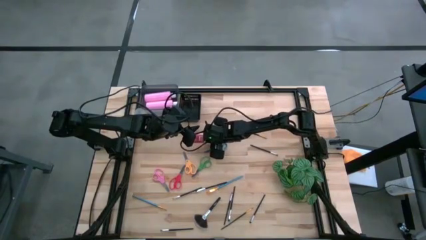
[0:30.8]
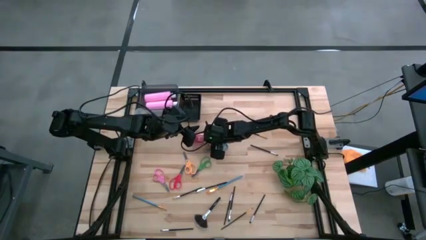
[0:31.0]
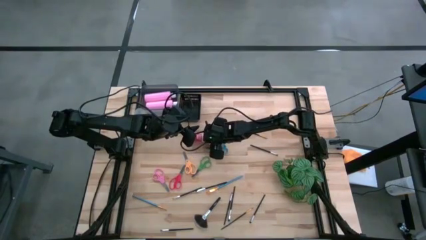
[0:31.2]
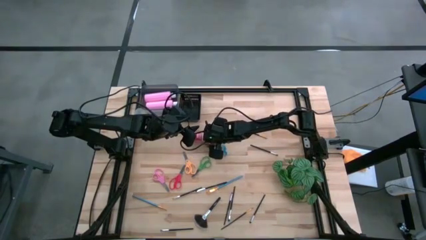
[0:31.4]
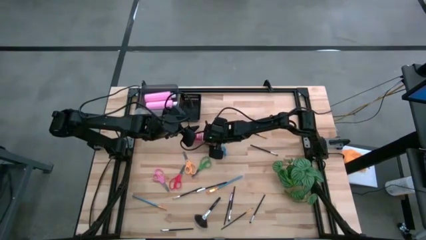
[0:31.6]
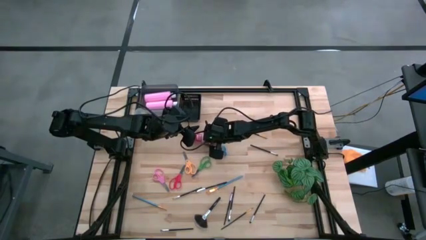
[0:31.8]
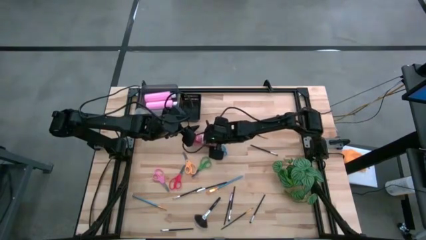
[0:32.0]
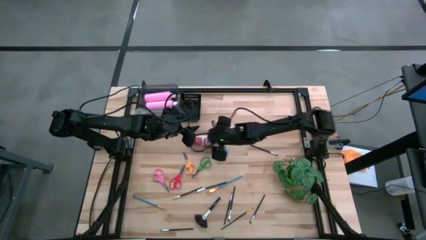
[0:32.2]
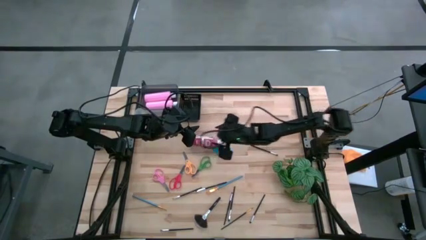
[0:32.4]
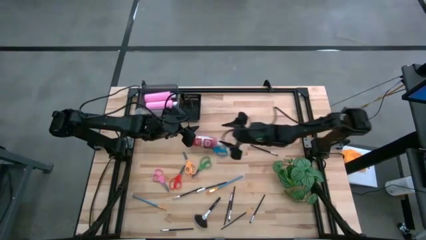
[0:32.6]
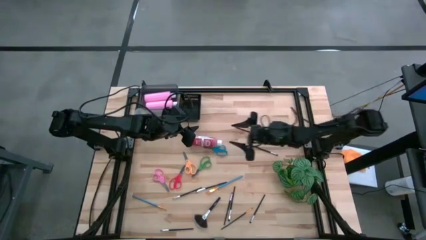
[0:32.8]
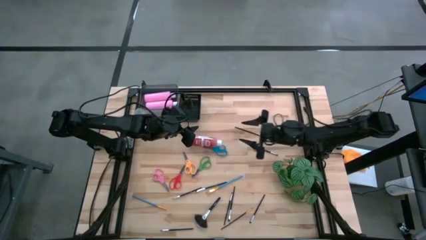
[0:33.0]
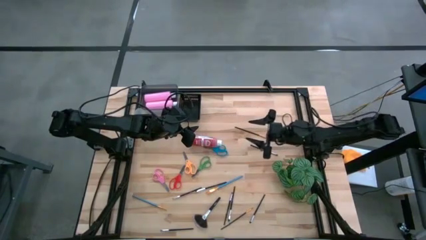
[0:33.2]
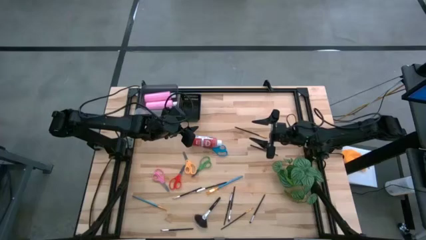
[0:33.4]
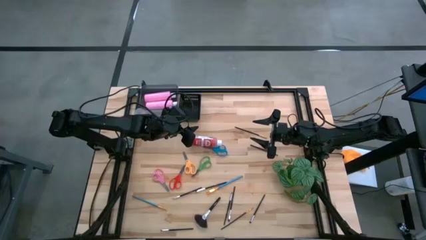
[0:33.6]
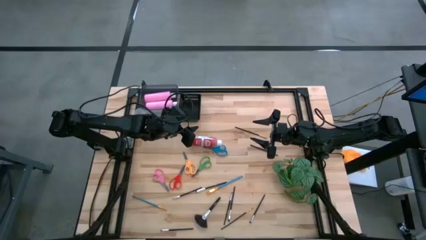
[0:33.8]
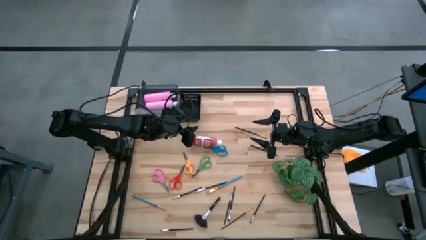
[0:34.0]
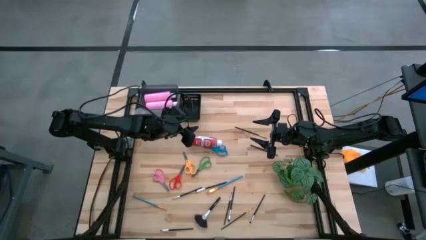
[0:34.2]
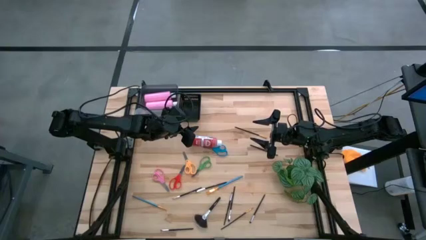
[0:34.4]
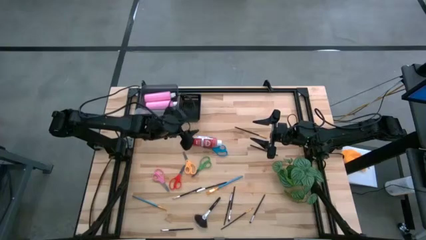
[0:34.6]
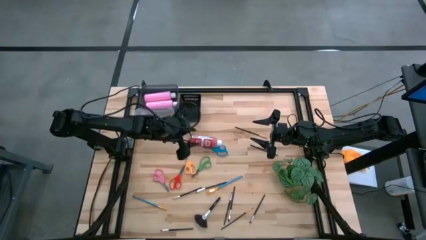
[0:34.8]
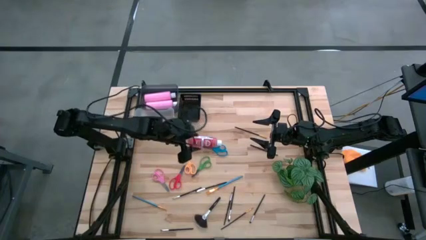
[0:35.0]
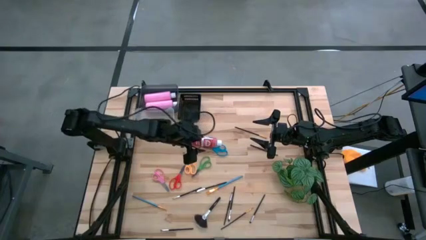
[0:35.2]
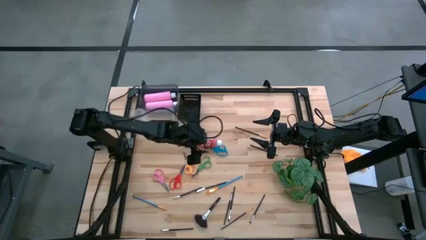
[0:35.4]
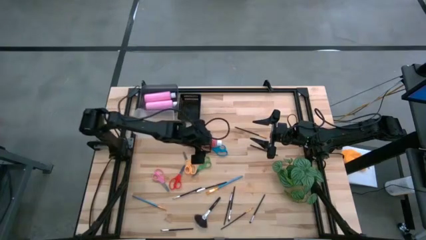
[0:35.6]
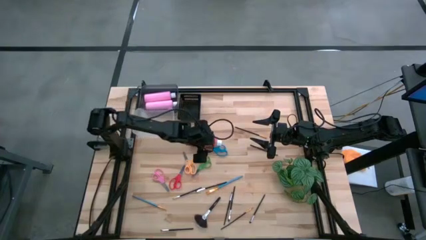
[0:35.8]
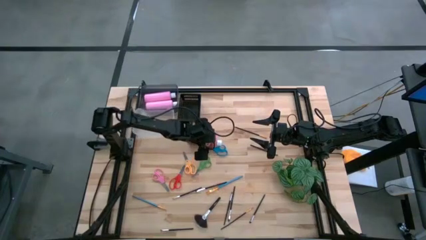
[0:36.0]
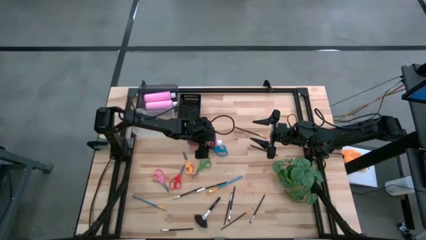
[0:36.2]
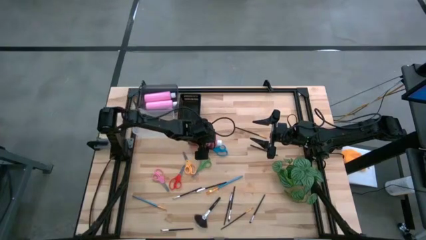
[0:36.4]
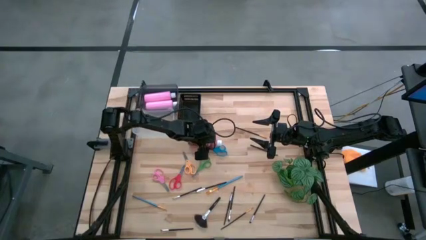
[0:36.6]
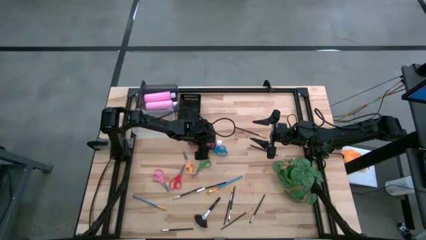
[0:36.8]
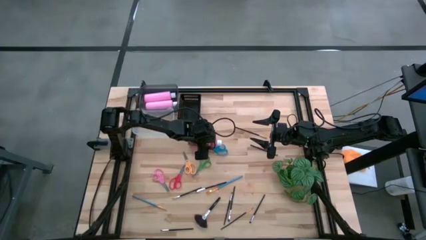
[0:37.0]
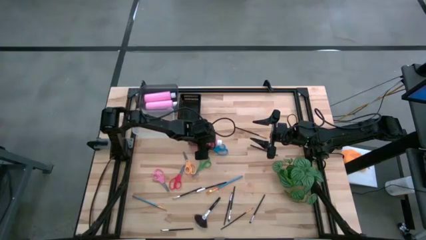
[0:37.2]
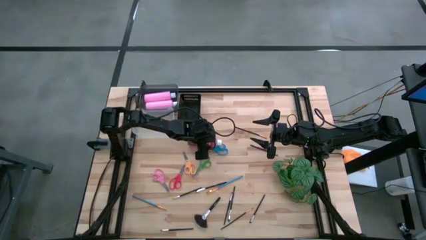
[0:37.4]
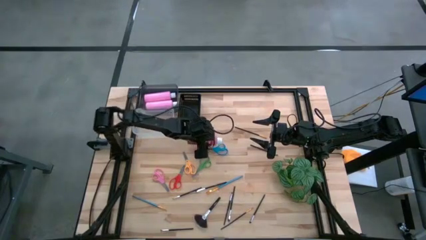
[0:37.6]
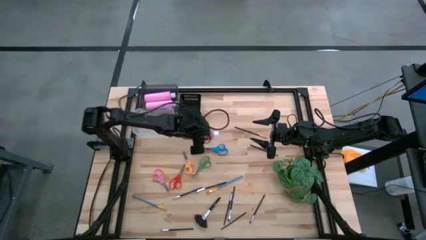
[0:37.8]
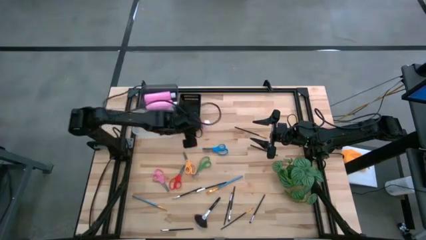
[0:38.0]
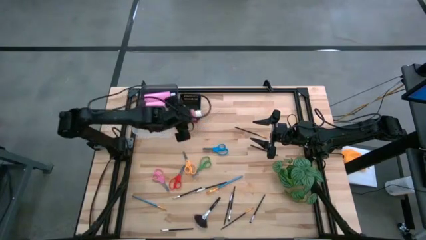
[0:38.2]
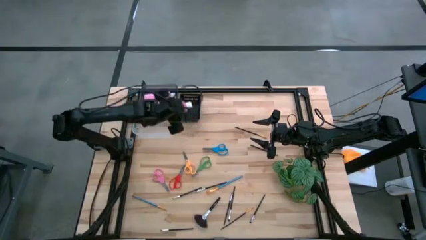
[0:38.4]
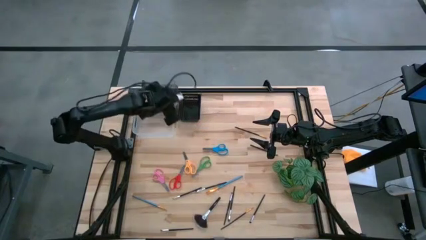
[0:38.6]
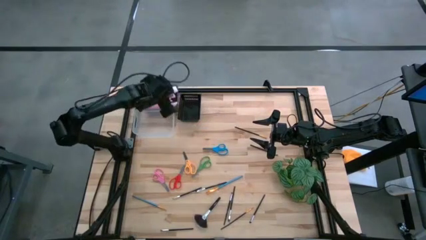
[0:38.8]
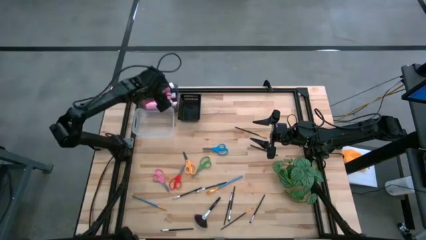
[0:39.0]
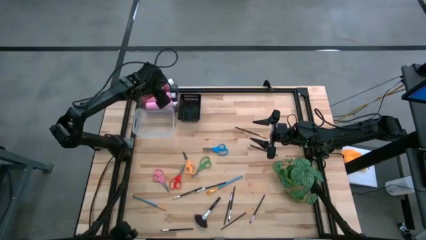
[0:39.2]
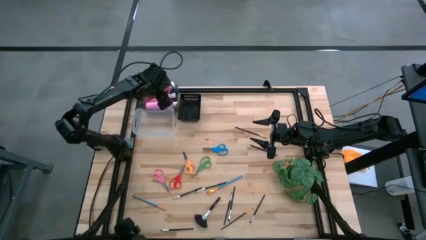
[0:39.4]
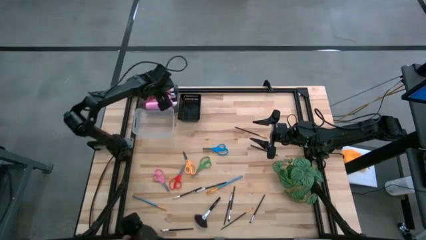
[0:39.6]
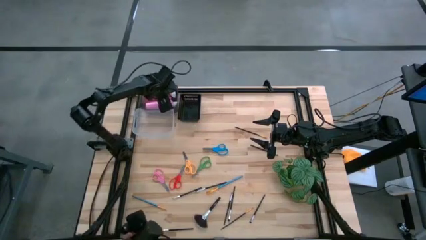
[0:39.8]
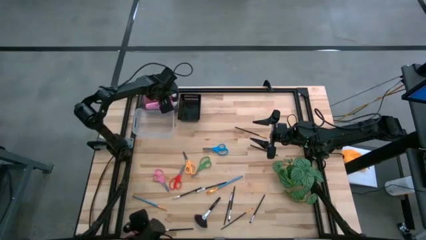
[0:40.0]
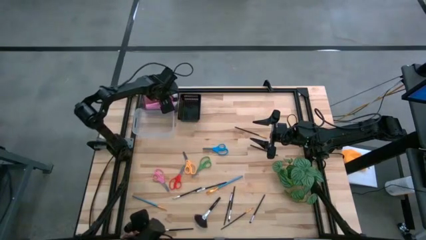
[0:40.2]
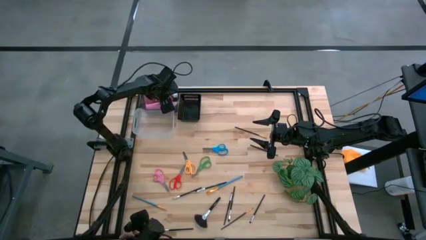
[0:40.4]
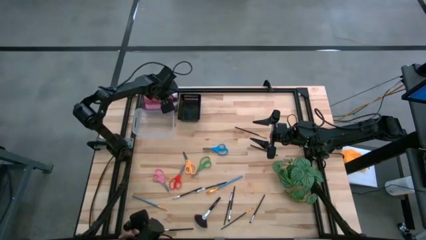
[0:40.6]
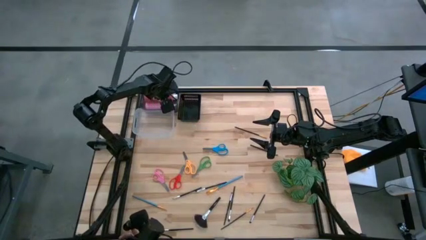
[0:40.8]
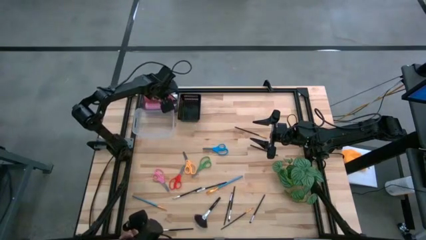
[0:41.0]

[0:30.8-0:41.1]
Task: Pick & Place Paint Supplies
Put the red bottle into the left black bin

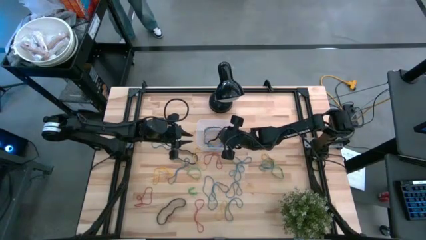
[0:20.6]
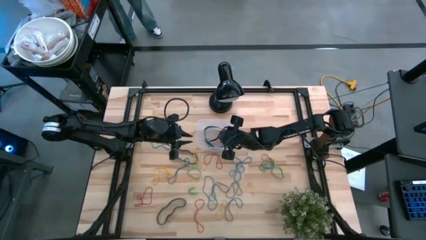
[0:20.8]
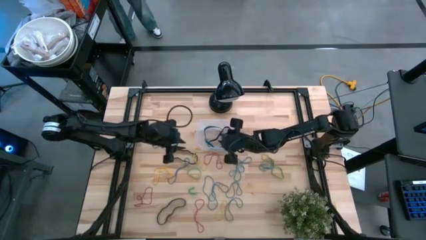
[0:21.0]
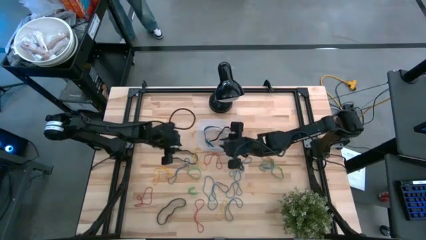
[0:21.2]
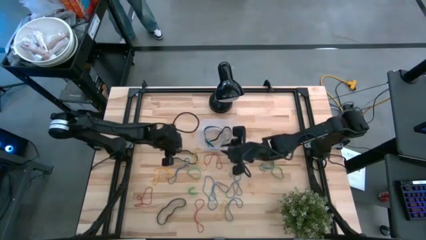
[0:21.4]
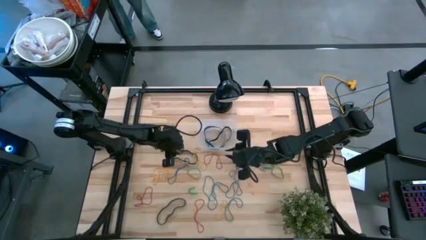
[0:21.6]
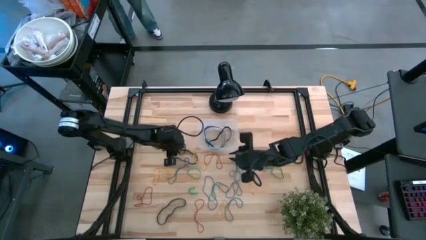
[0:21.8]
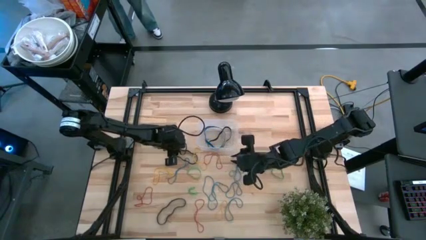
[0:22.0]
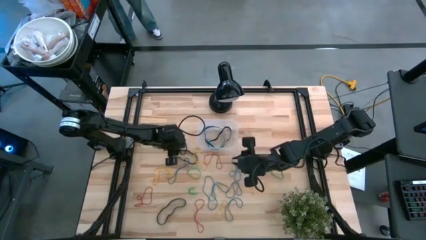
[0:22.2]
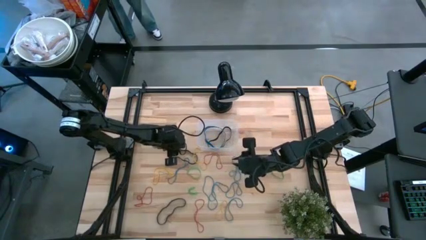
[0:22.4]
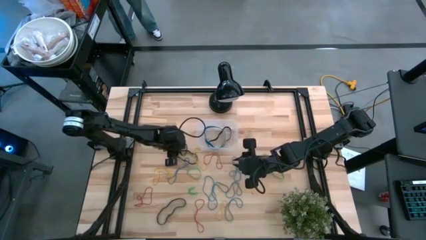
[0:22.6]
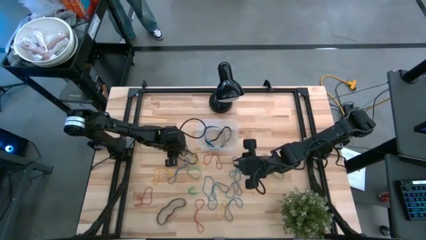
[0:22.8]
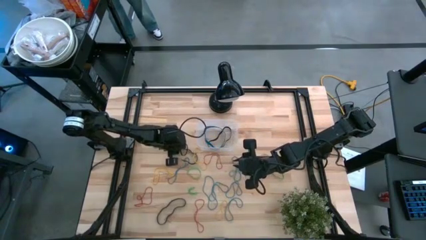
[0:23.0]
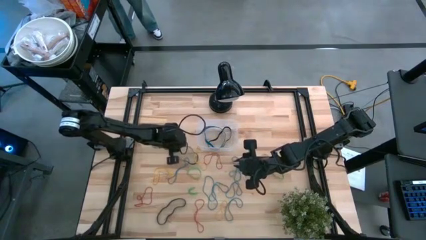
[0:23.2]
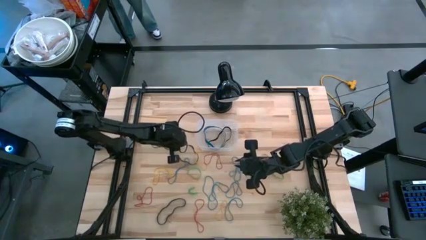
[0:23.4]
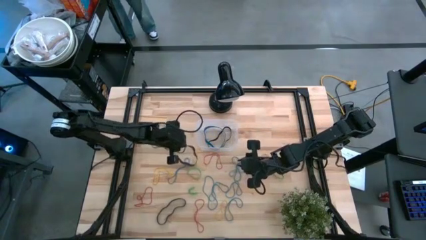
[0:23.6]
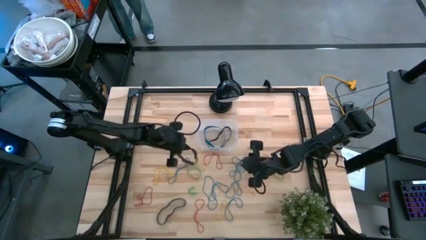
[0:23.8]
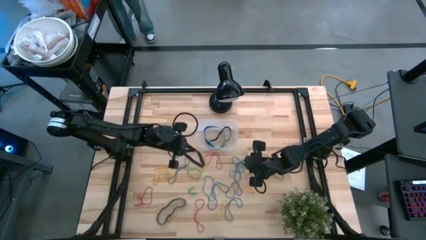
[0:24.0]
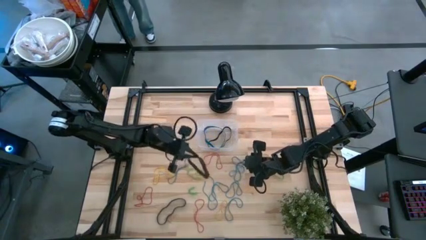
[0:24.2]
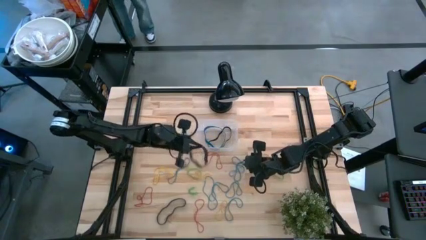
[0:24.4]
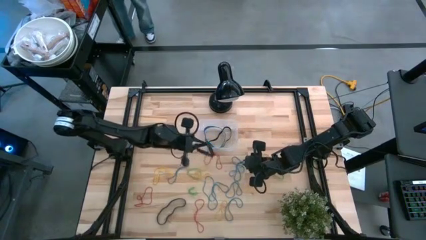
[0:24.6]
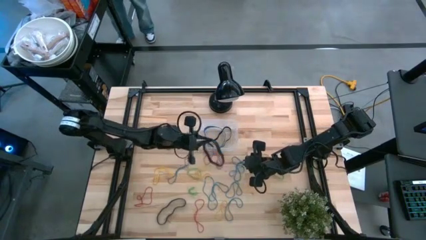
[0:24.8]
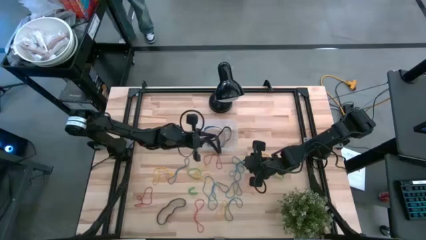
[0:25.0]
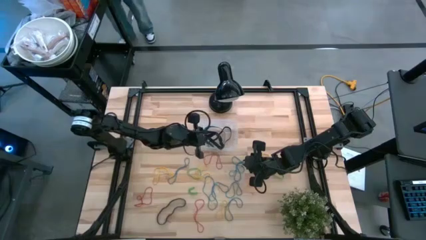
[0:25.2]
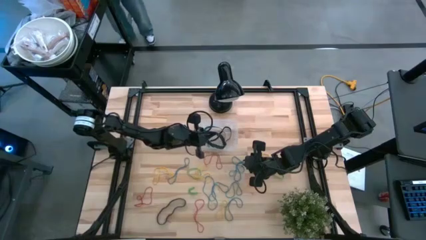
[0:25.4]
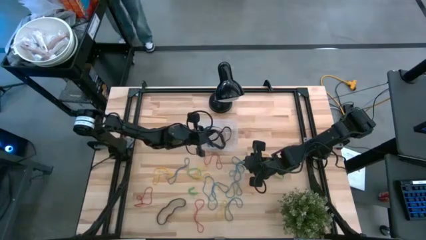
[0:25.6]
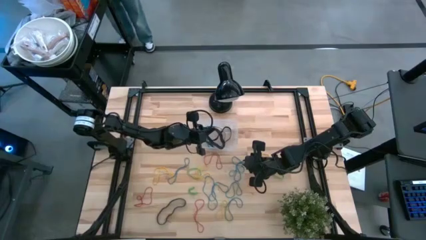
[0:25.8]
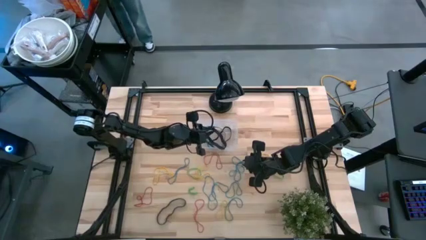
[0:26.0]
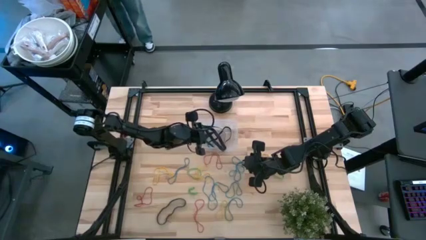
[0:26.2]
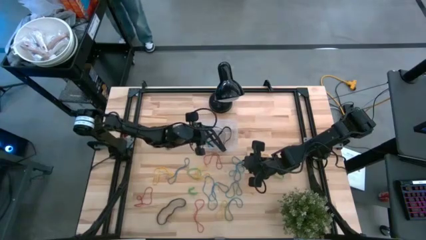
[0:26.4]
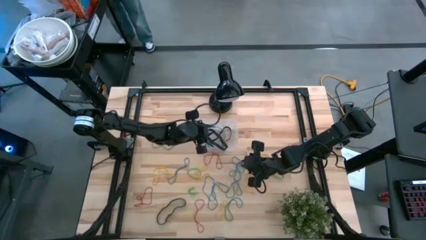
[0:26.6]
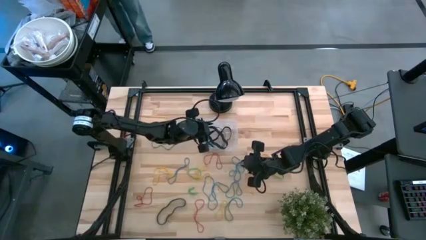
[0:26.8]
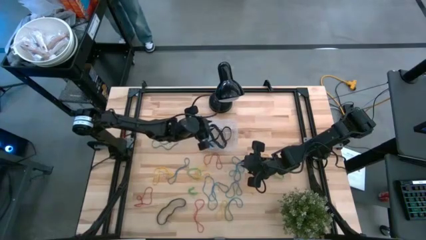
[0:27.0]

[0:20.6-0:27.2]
Task: Pick and place rubber bands into bin
Put the black rubber band into the transparent bin
